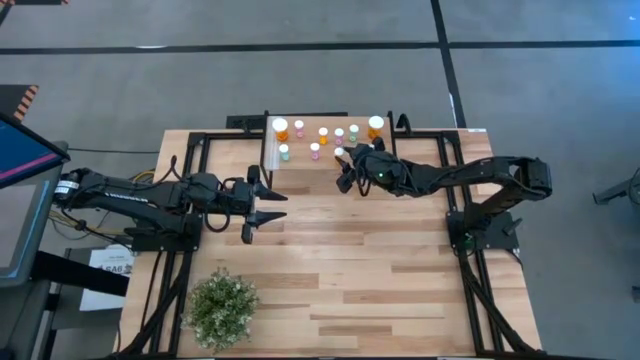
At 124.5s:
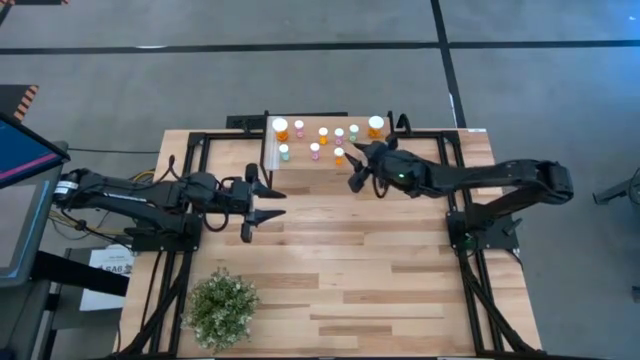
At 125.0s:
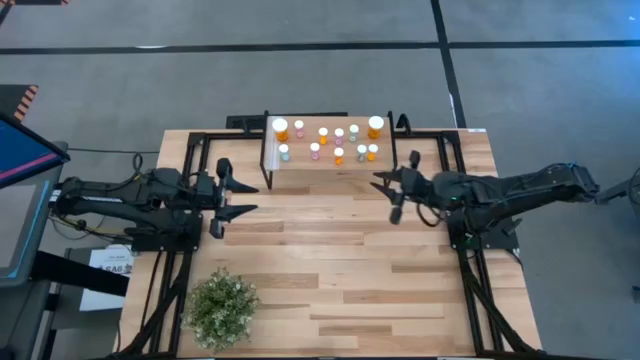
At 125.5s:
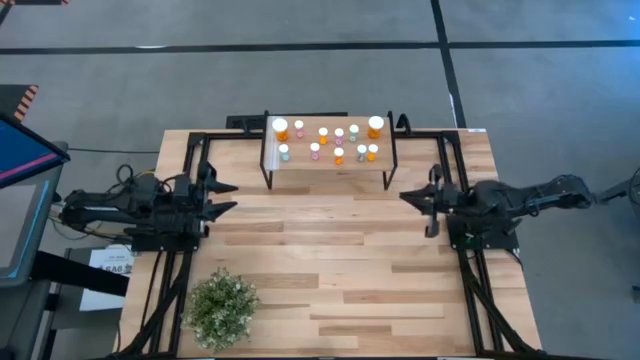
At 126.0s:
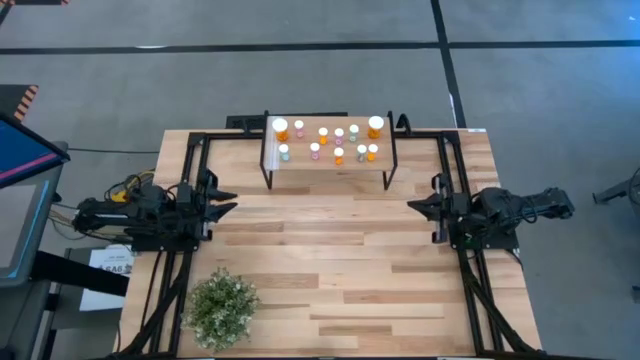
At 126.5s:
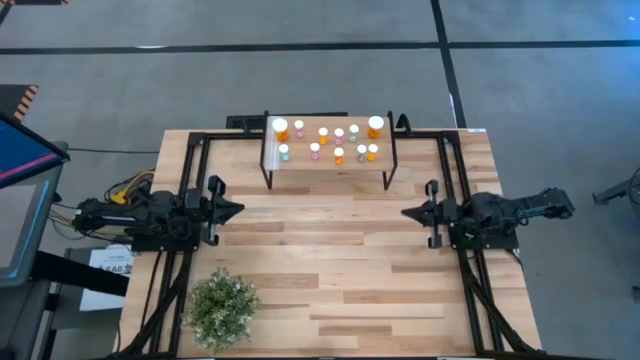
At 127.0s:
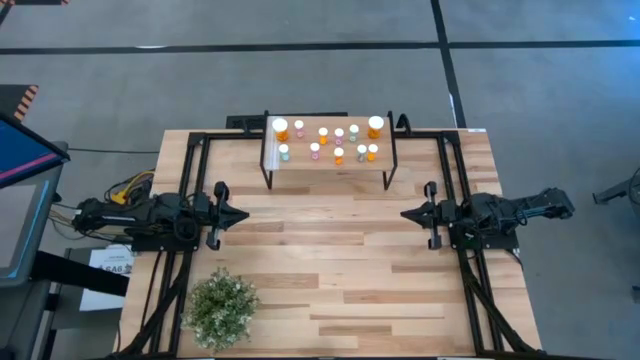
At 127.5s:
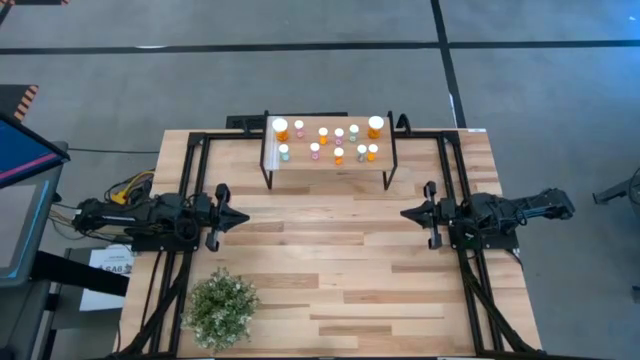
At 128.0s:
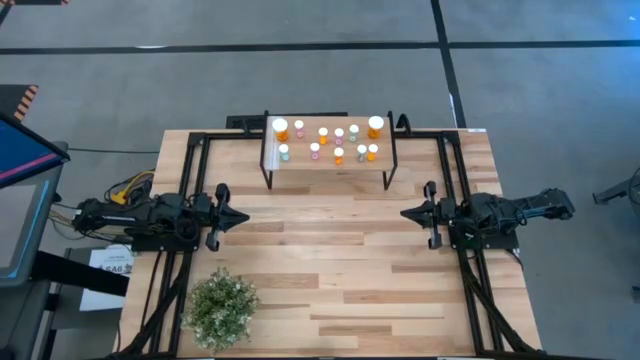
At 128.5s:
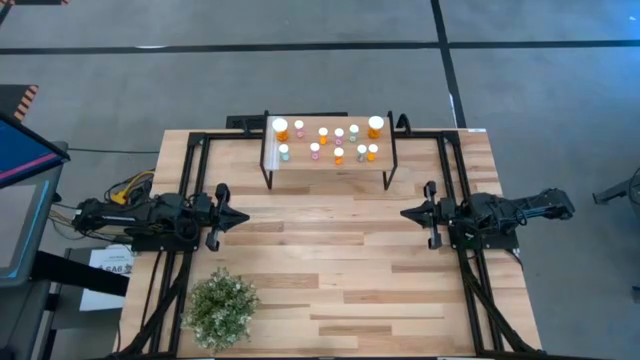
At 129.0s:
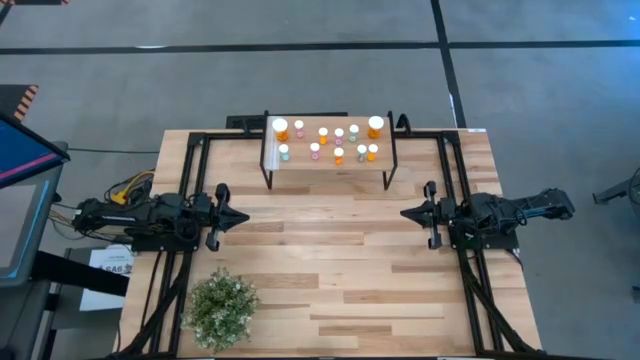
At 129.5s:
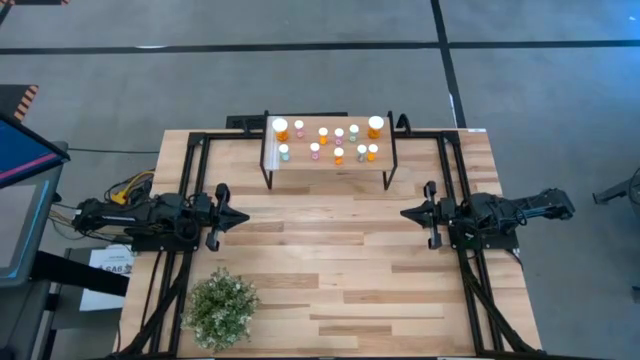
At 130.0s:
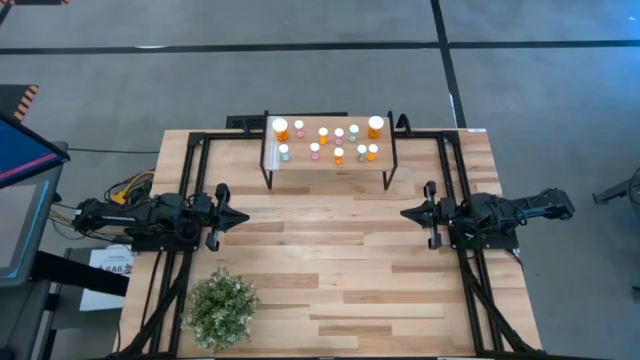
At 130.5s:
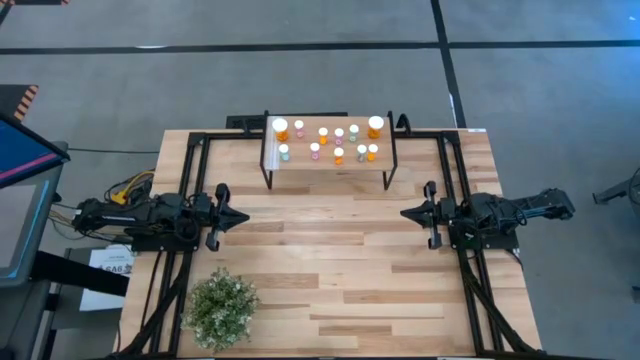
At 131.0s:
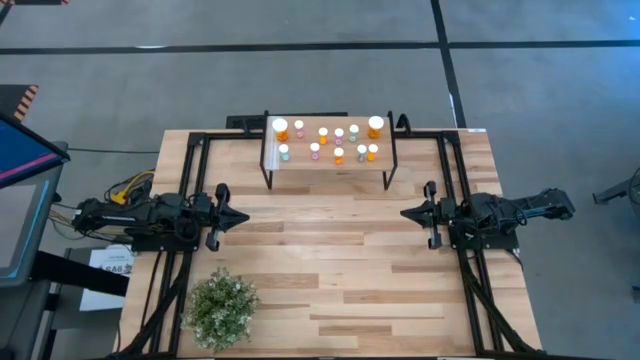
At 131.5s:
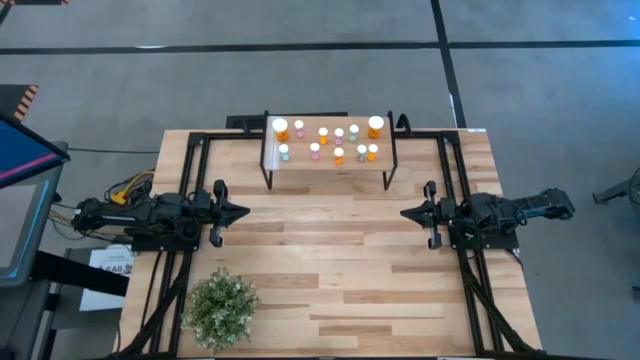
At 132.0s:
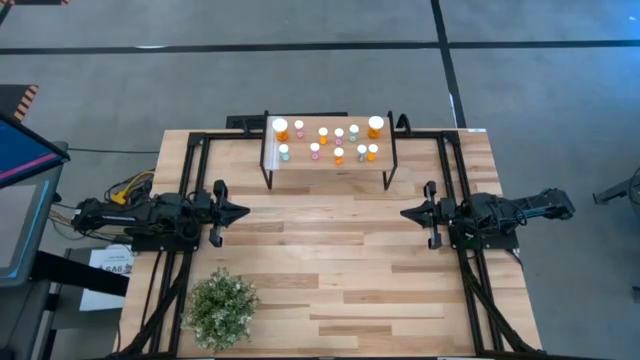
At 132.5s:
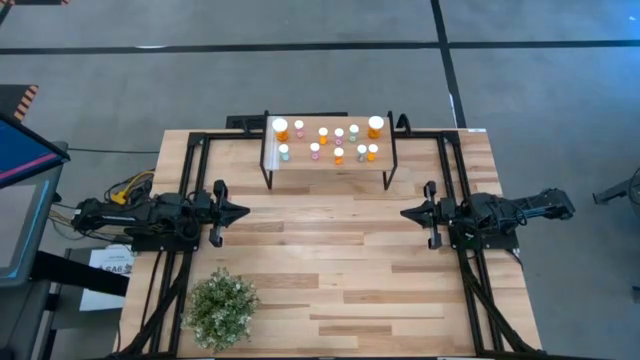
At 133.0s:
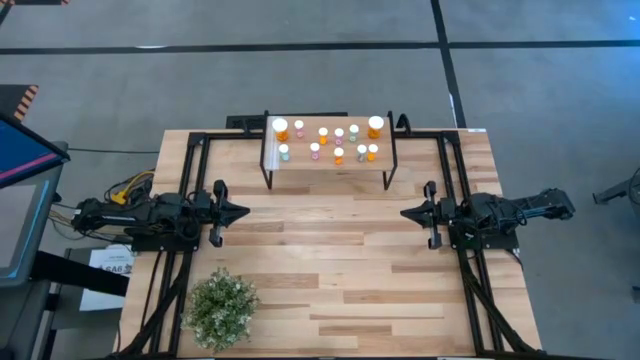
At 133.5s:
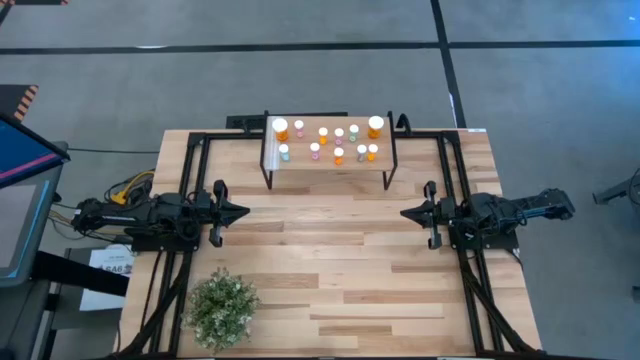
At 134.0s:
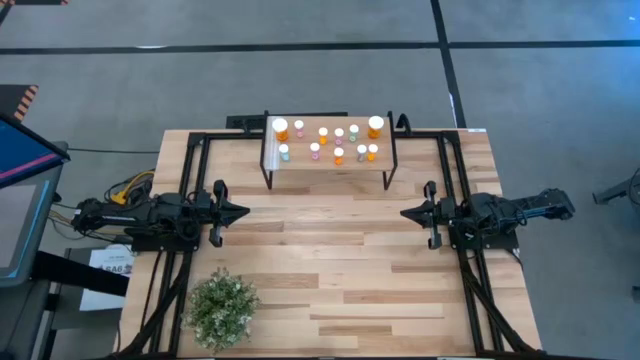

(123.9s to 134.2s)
Task: Pick and place medicine bottles onto shelf by color
Return to Home Position

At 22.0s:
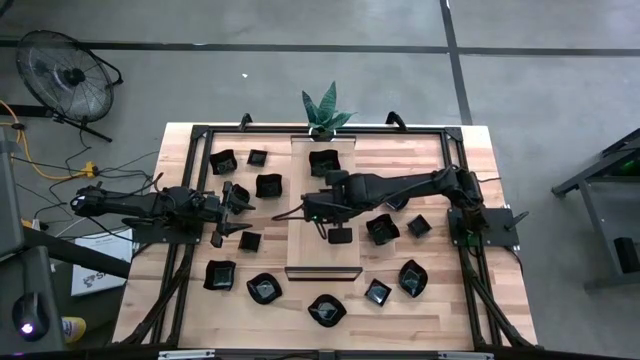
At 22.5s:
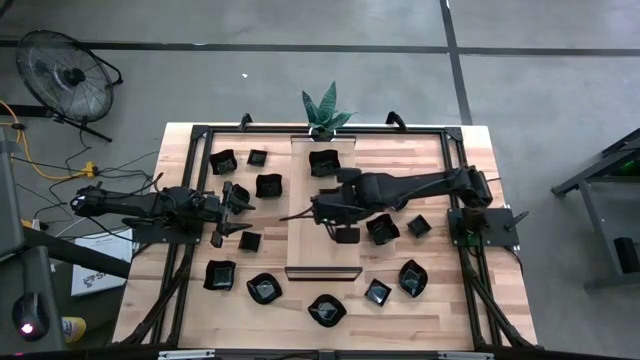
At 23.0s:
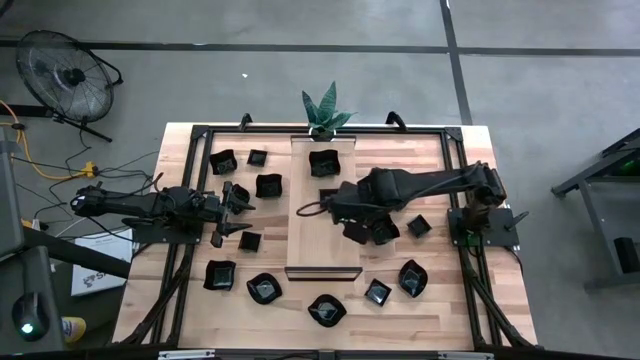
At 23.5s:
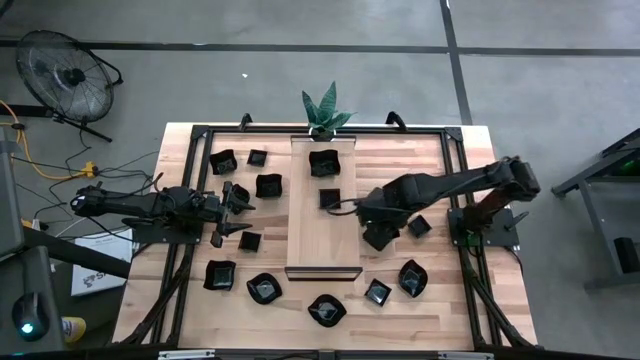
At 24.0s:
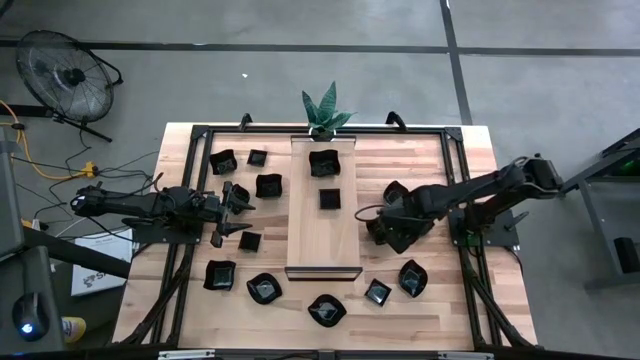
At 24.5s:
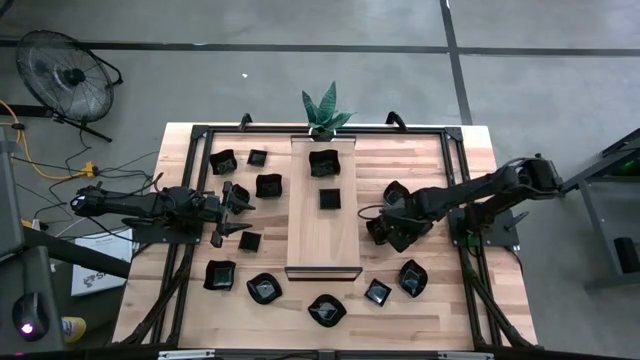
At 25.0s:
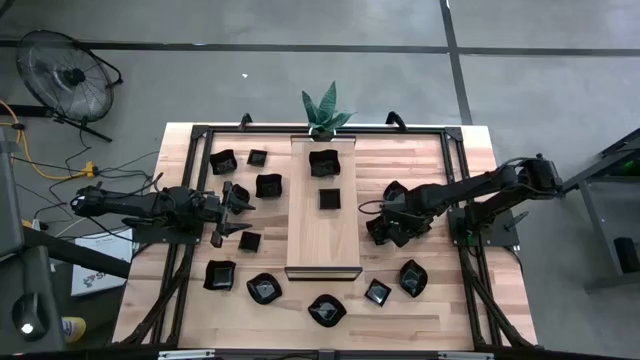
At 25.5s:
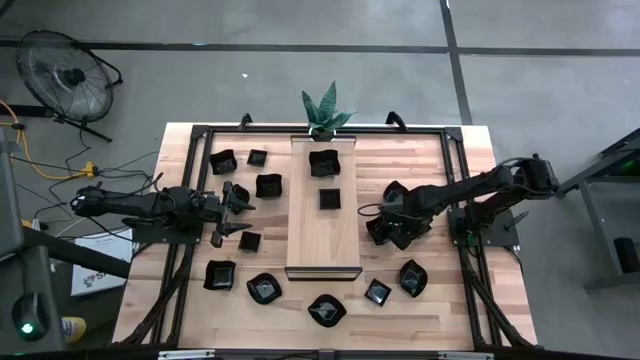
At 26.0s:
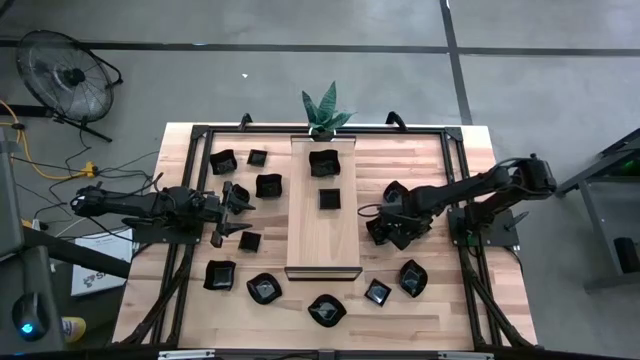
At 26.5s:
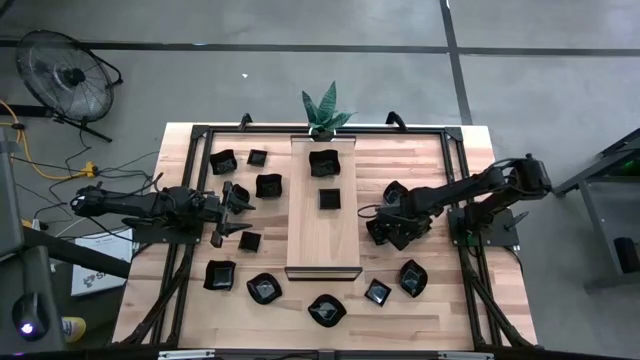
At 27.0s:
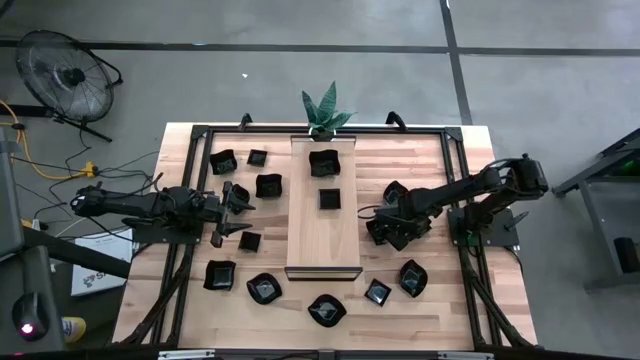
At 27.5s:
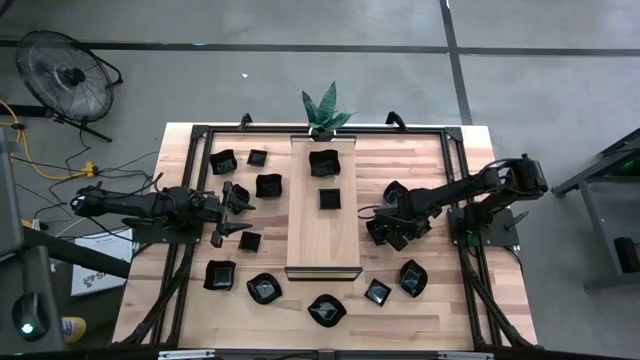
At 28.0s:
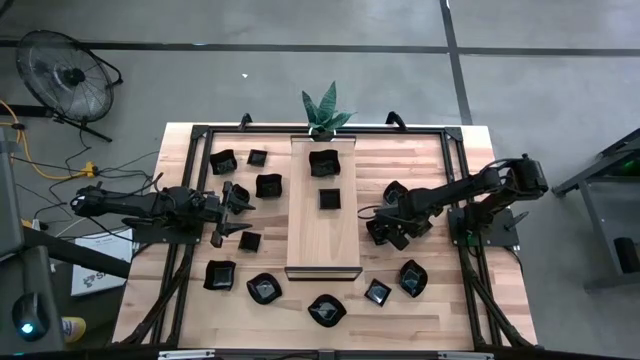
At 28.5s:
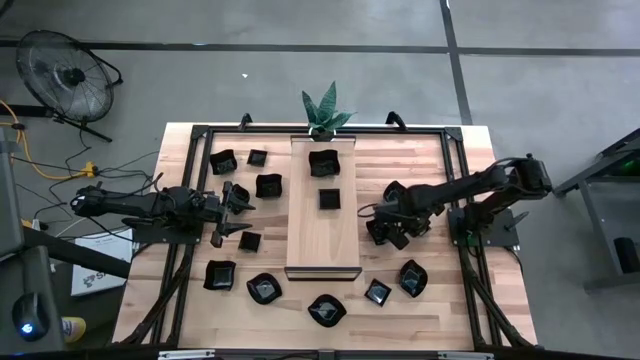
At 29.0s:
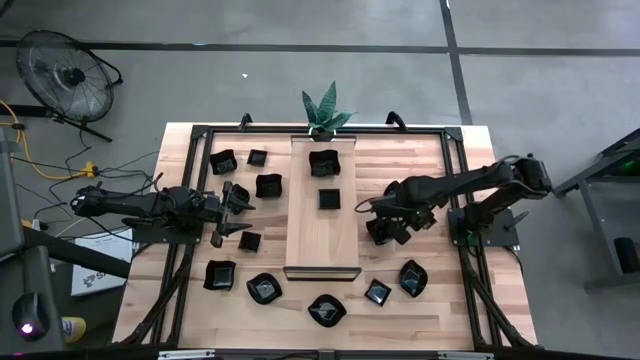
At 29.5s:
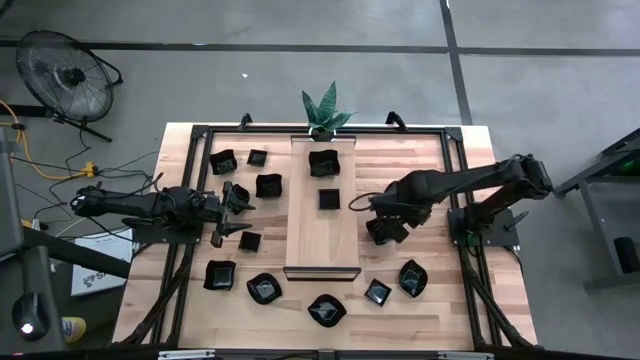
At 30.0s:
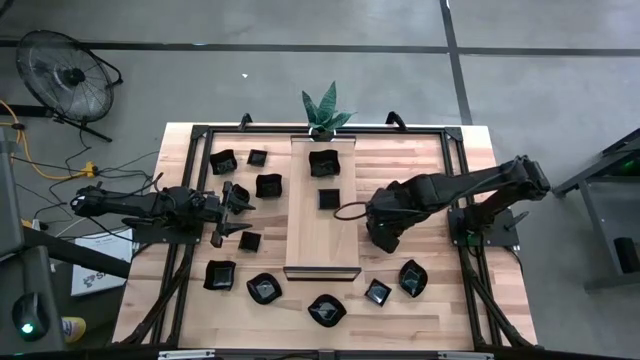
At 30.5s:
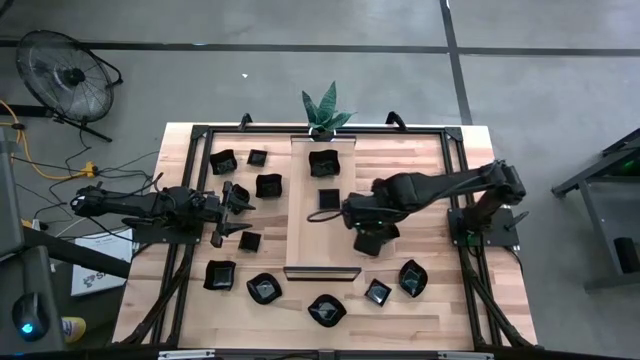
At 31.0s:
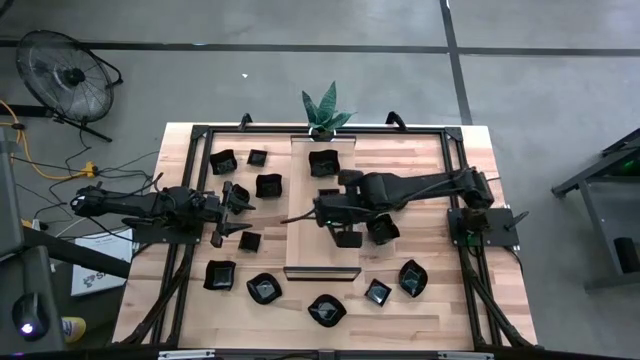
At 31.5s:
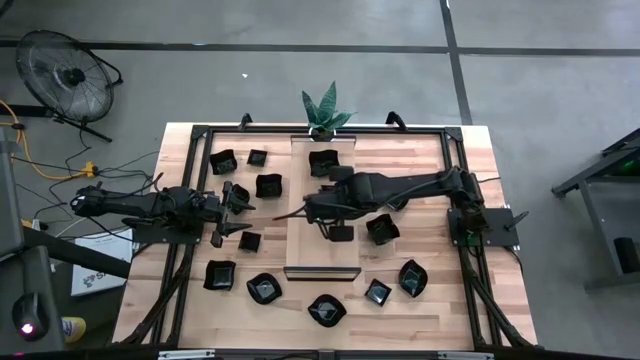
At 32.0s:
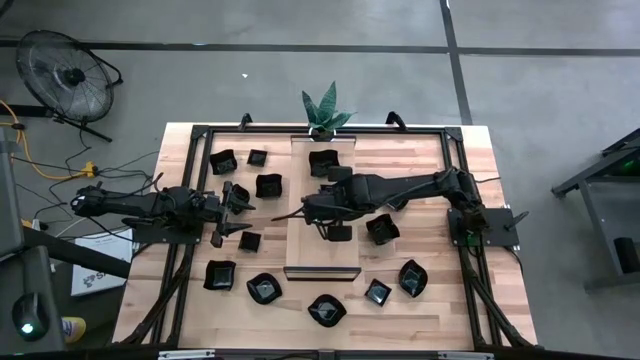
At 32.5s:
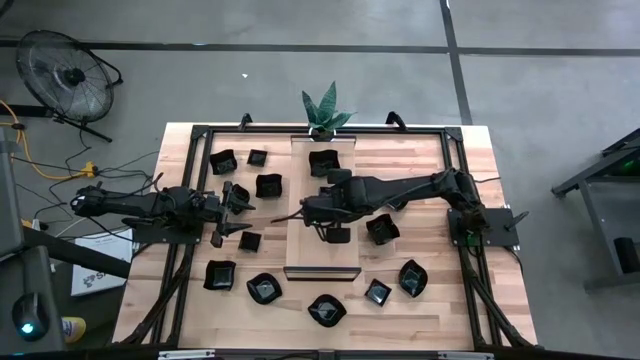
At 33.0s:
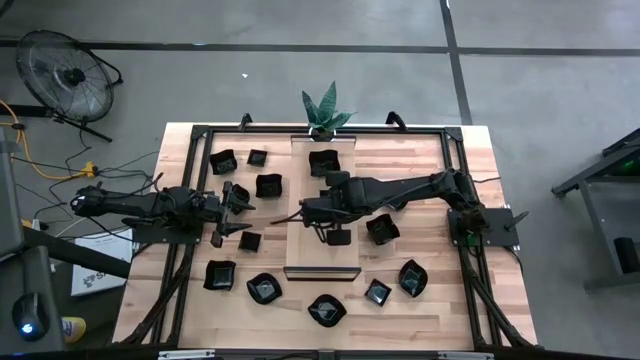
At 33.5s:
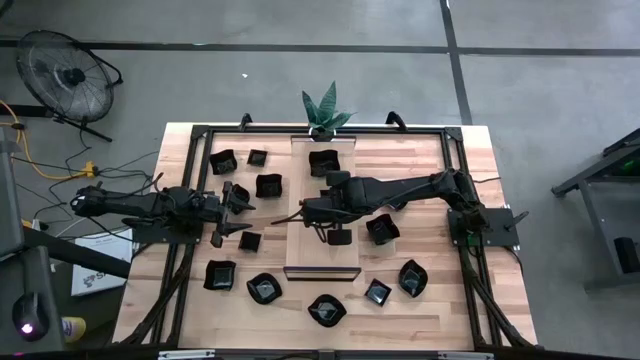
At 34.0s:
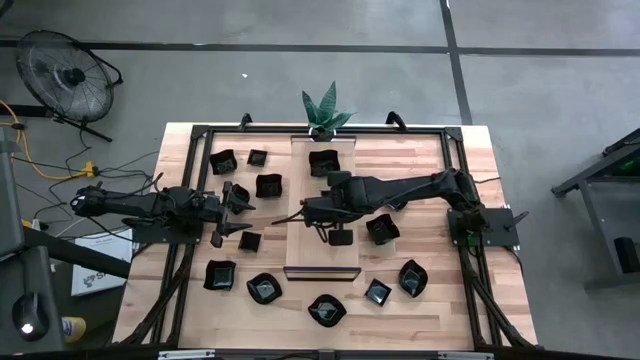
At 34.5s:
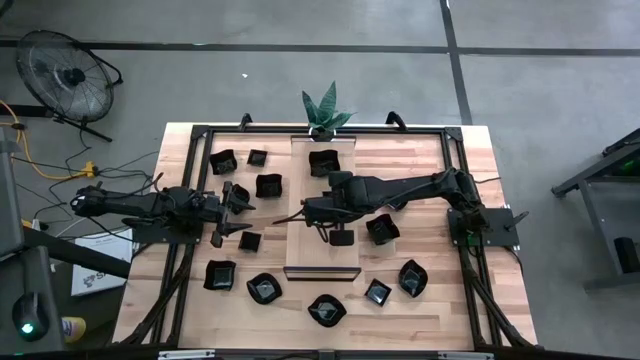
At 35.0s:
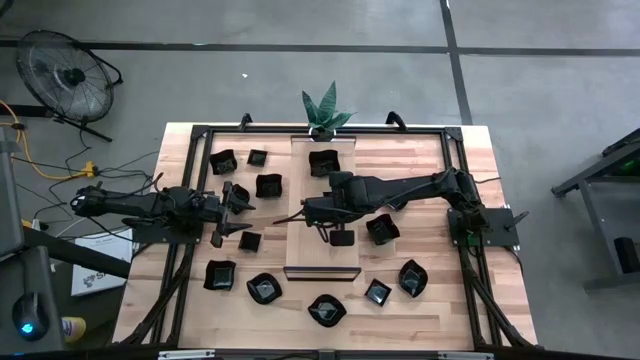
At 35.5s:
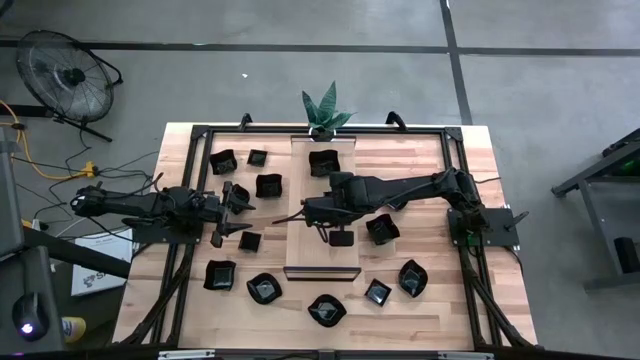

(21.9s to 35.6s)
Task: Pick & Place Mini shaped plates
Stack the black square plate on top of the black square plate on the shelf
